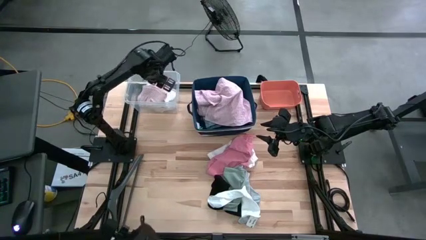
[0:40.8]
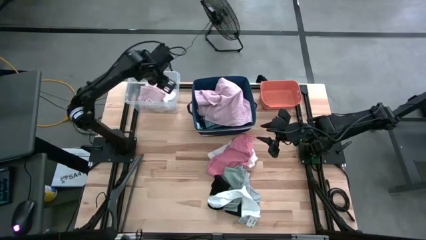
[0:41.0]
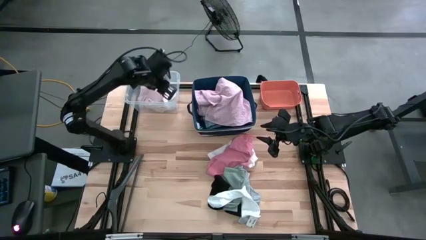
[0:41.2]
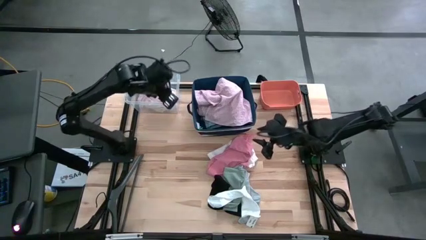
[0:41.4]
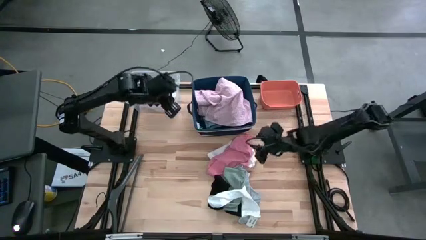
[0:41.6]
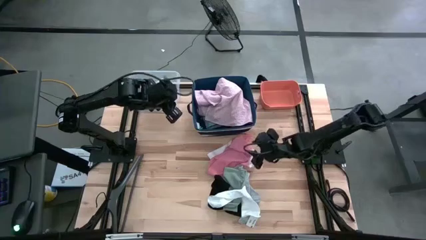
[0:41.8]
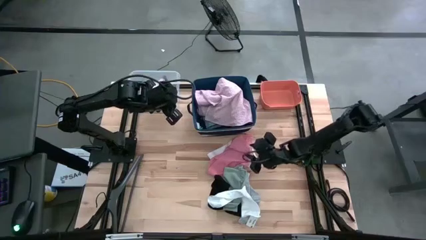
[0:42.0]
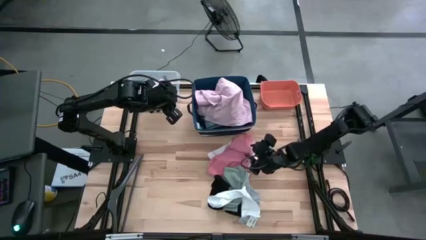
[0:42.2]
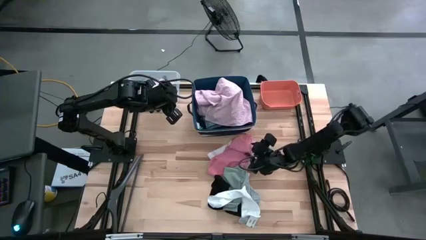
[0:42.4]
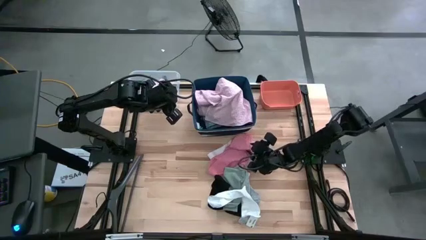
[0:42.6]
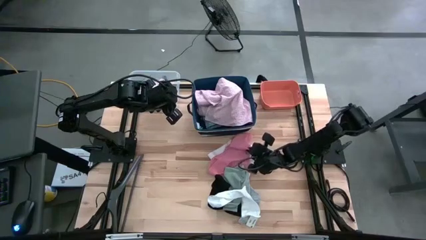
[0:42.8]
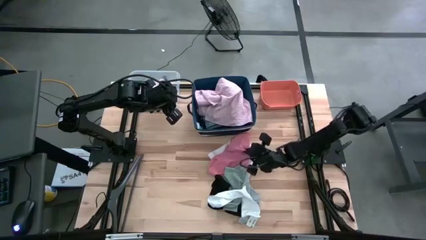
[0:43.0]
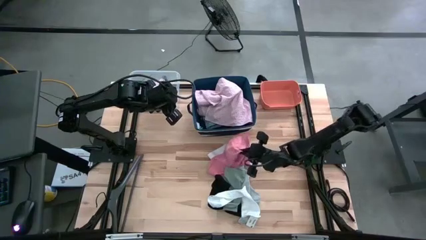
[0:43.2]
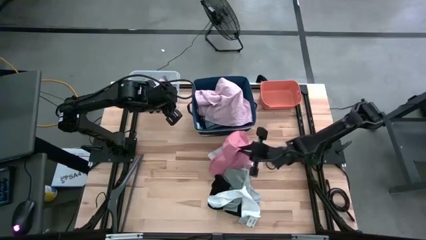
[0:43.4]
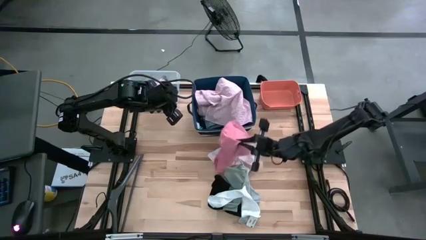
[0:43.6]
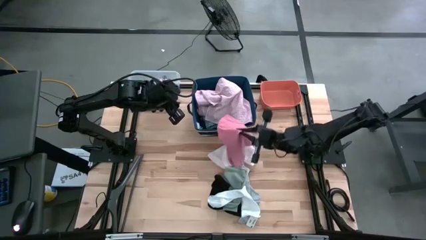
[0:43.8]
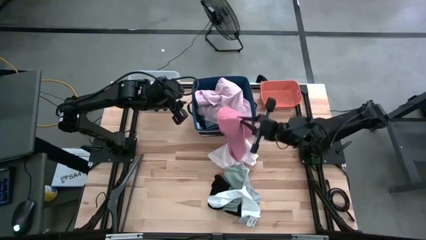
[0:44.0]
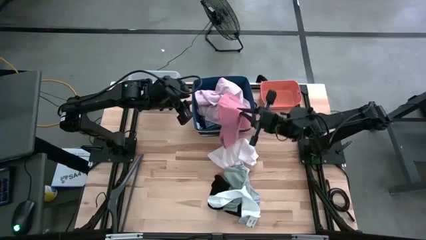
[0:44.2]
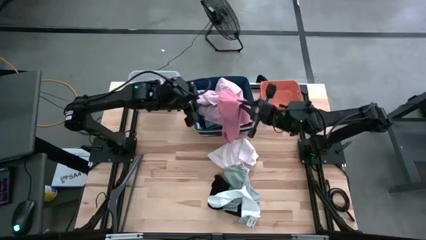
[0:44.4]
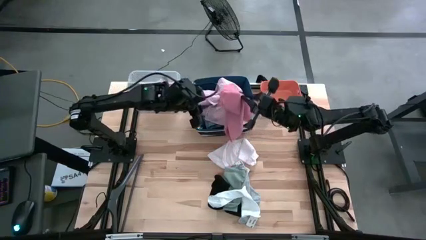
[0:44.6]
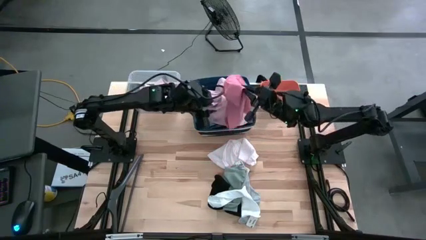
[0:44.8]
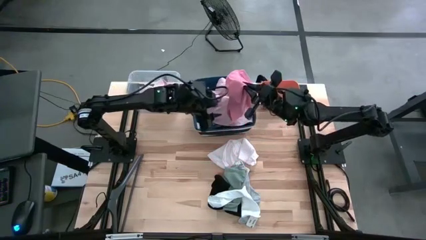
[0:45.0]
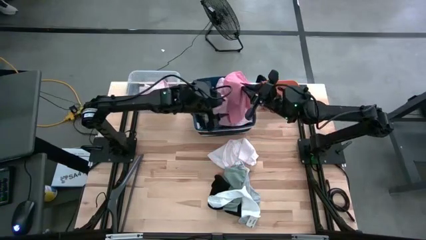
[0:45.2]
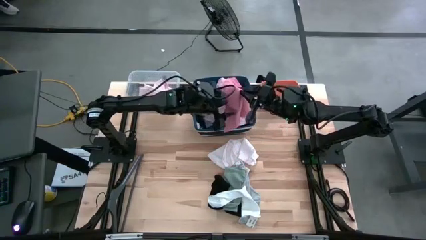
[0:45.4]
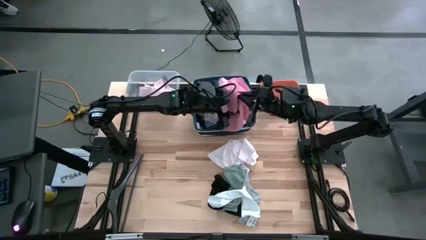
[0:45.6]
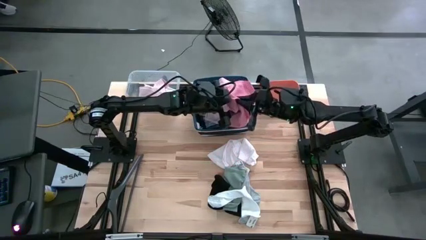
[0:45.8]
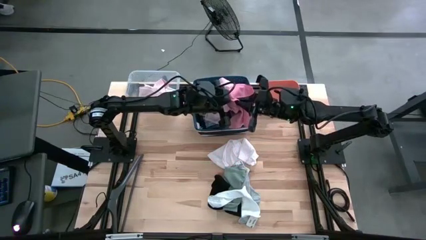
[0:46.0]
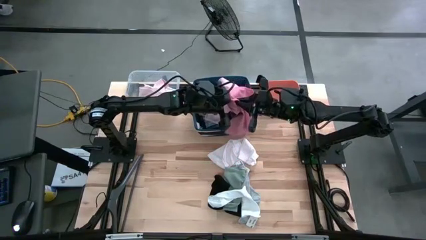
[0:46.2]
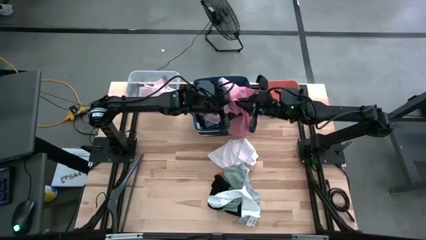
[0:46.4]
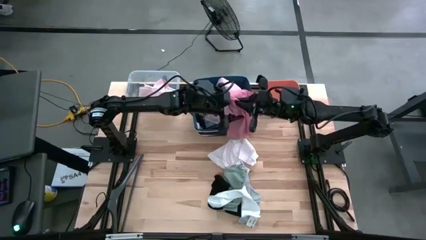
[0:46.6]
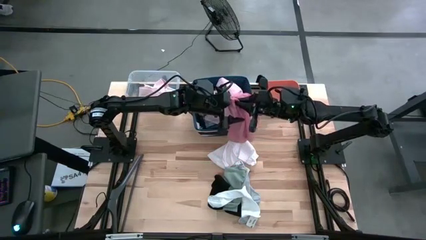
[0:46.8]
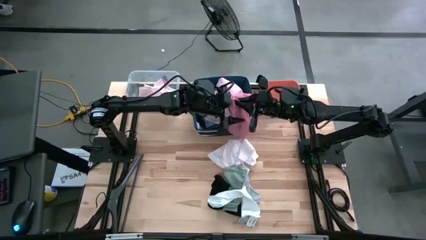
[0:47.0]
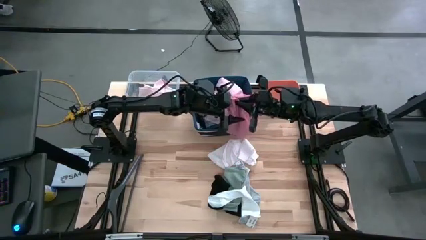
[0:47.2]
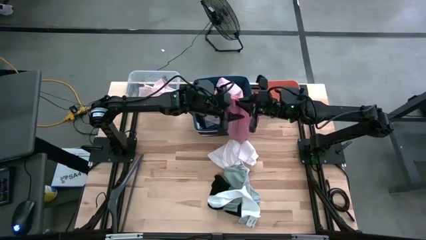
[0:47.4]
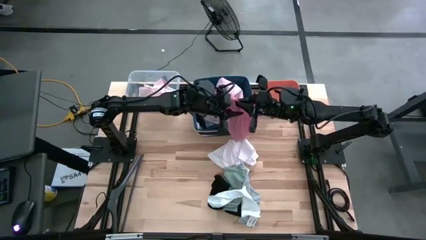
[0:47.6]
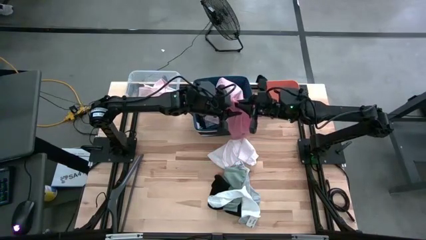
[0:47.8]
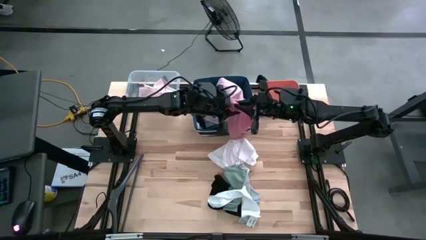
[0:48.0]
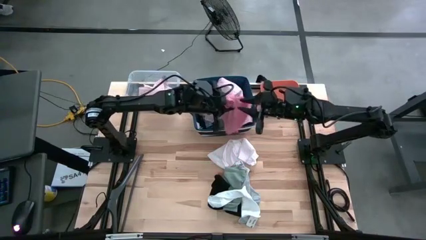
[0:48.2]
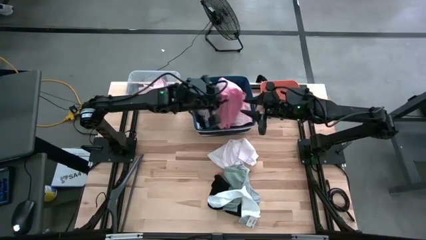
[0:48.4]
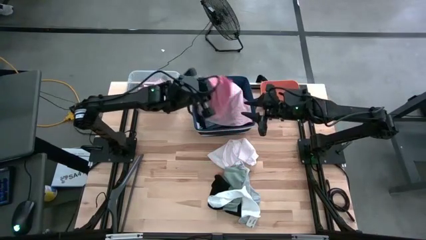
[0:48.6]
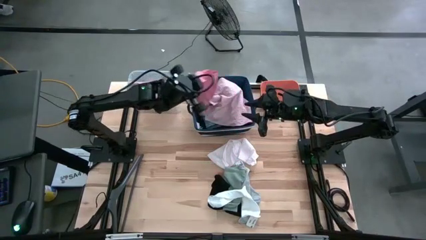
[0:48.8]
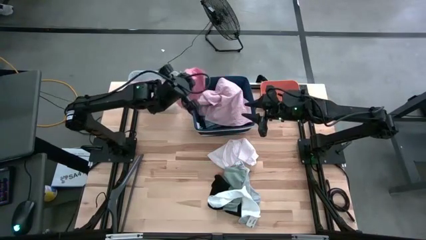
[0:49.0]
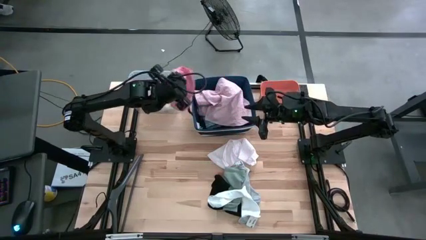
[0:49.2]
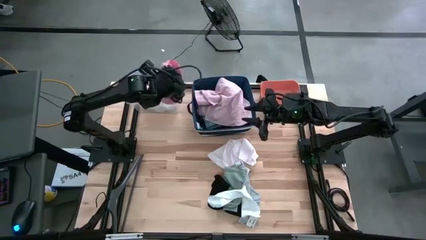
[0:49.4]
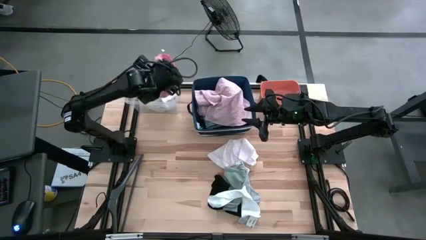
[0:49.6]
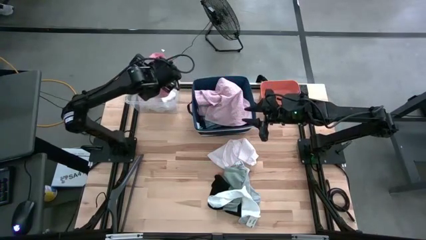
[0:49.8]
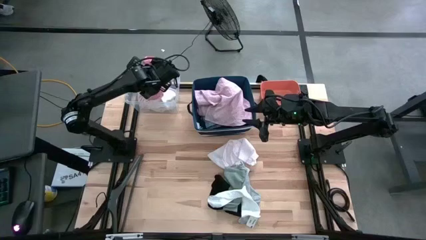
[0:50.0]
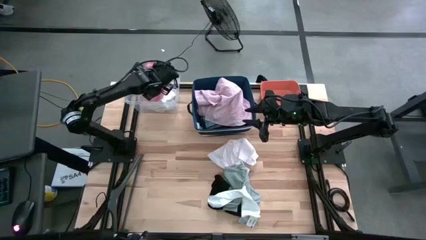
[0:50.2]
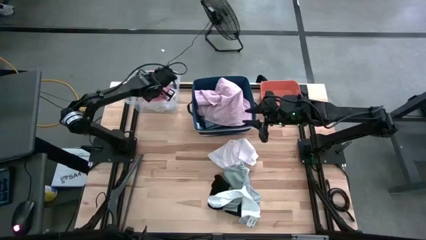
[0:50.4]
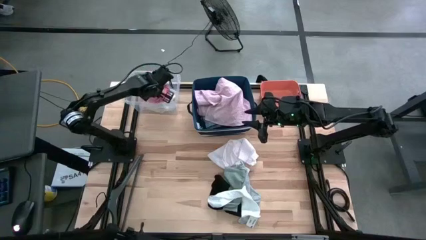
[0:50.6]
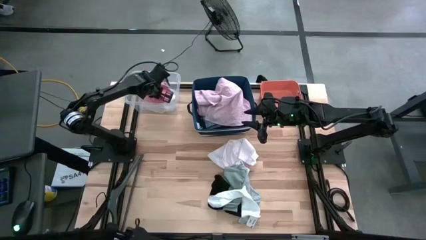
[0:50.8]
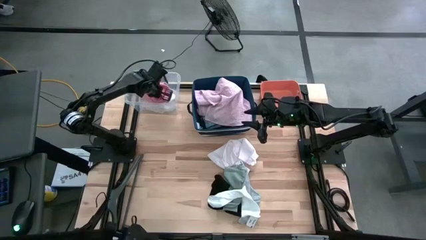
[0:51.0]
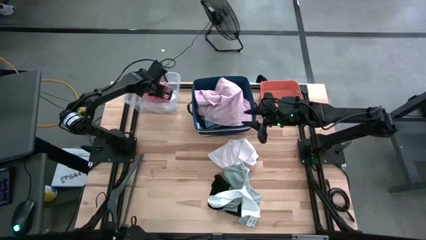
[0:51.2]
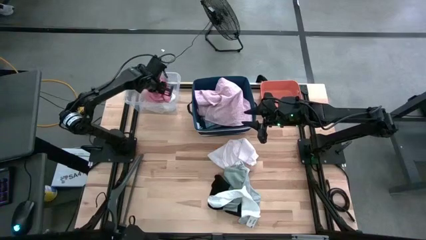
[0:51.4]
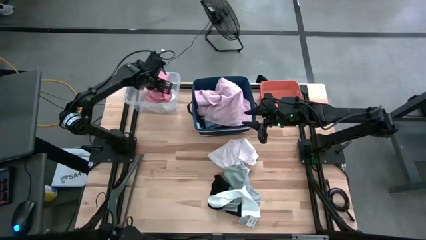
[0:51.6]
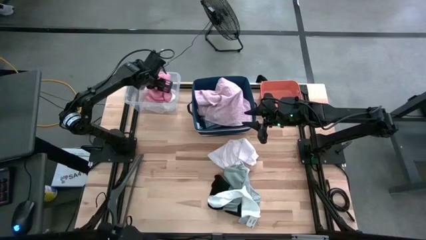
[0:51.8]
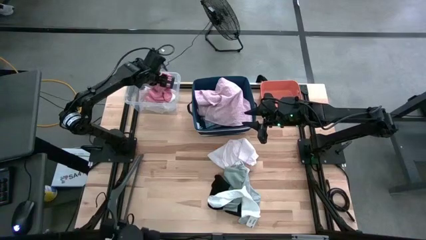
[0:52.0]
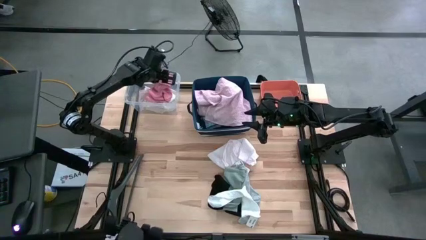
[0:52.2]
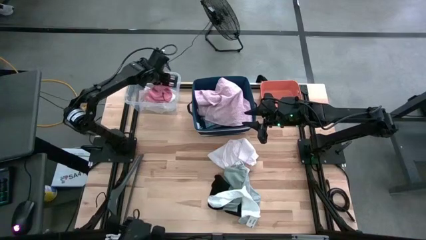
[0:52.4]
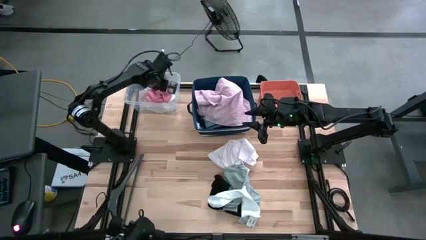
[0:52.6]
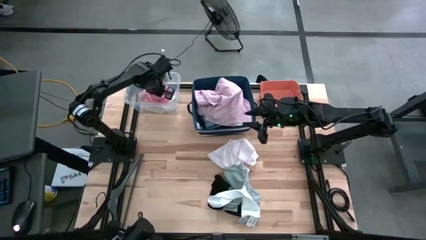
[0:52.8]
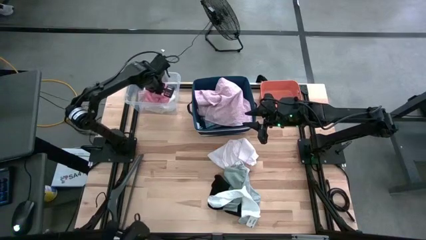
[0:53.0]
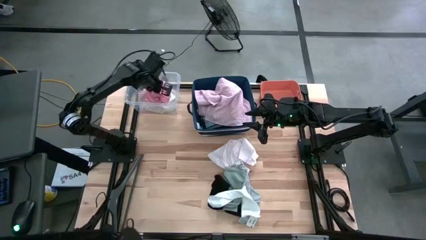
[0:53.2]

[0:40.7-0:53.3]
Task: Pick & Place Cloths
Put the pink underwear into the transparent bin

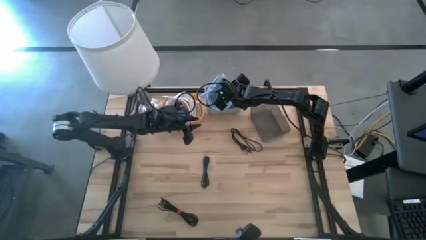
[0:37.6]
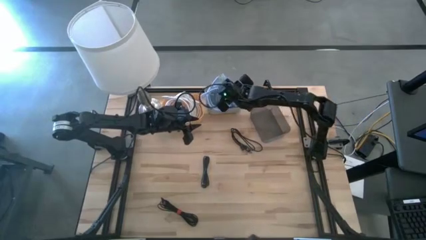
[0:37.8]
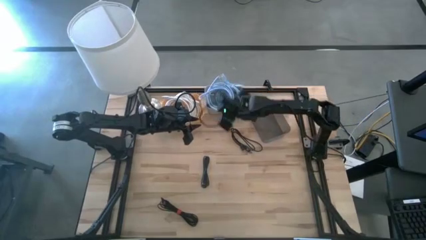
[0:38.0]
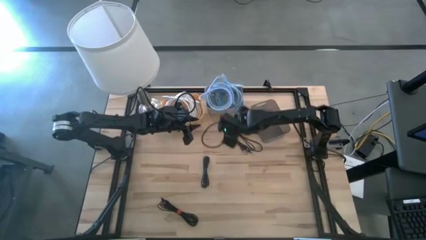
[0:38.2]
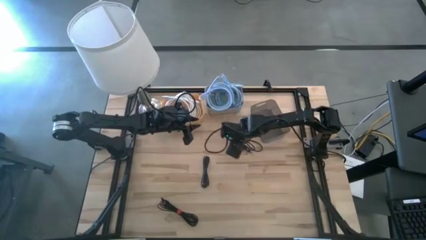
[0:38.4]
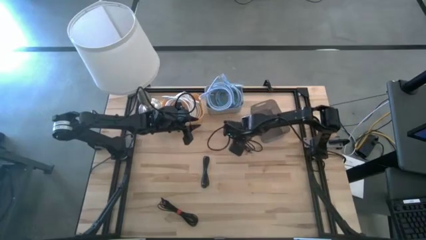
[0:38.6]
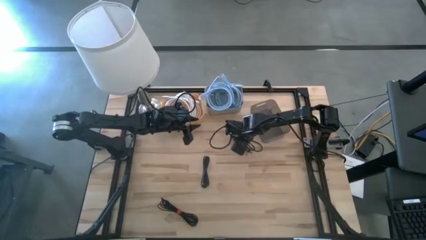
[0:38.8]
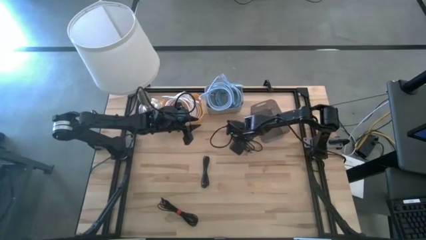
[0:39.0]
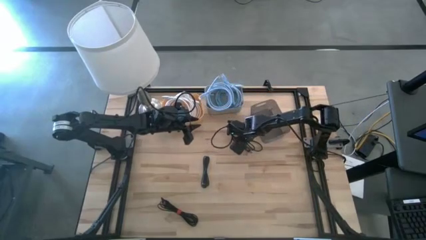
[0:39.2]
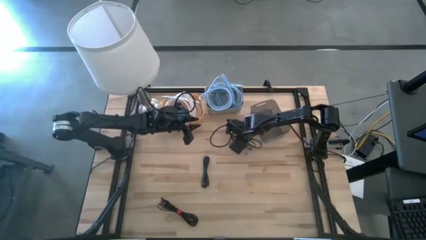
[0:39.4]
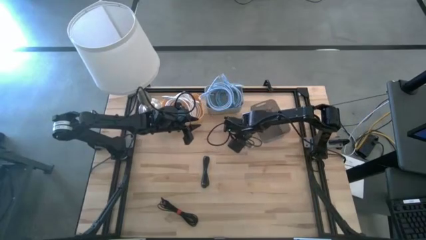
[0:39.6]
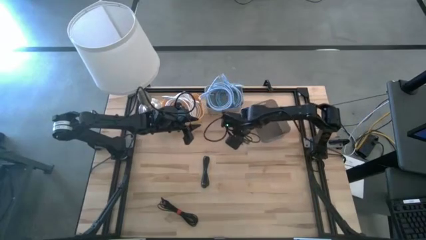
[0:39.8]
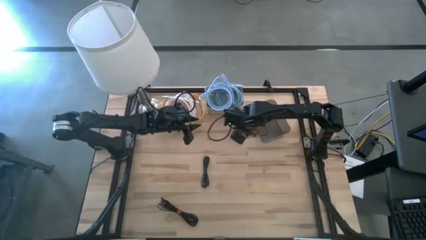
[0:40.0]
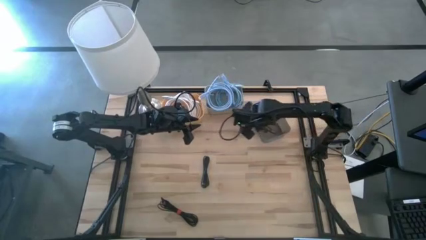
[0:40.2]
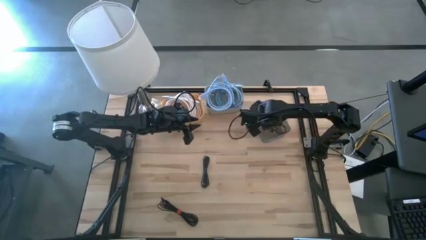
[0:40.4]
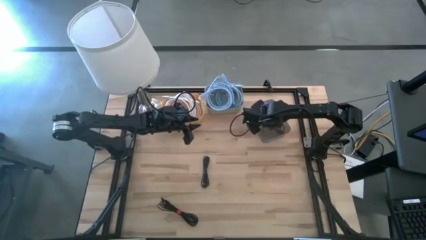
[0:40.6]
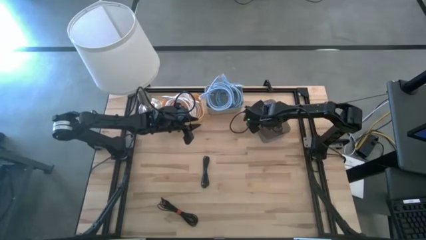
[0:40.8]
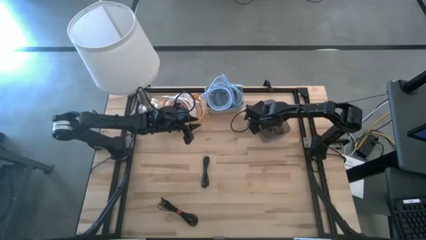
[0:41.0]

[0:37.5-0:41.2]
Task: Pick & Place USB Port
Put the top black charger cable into the black bin
